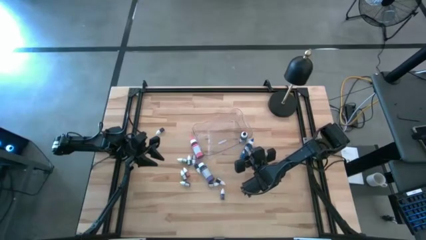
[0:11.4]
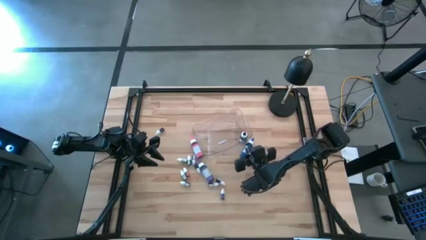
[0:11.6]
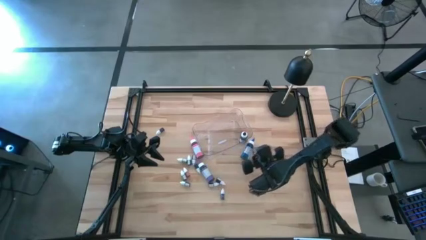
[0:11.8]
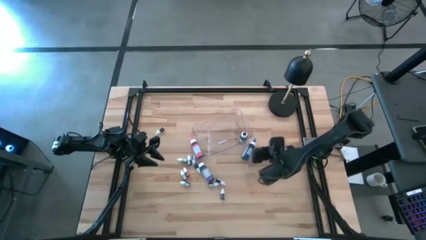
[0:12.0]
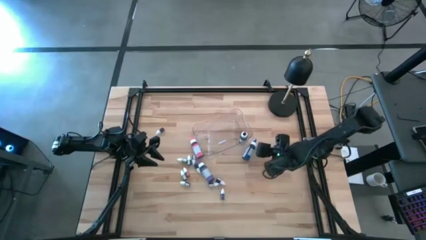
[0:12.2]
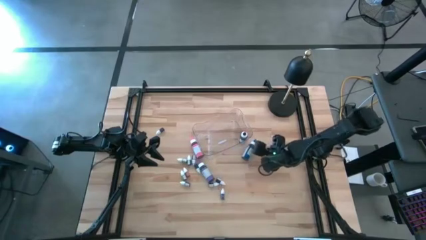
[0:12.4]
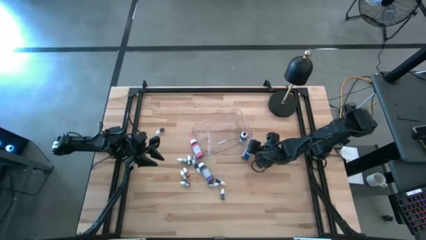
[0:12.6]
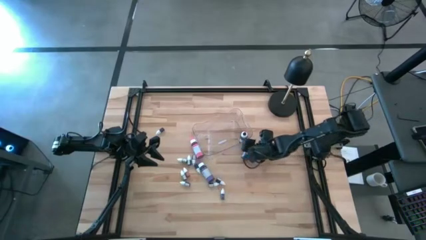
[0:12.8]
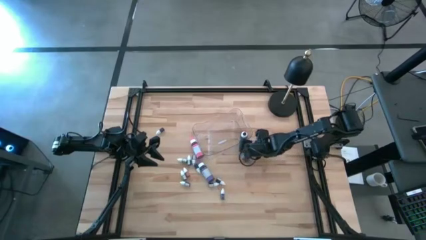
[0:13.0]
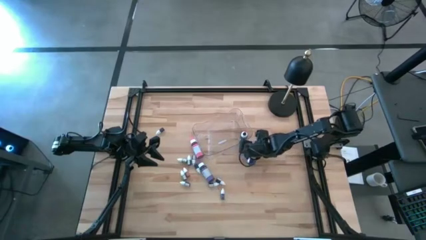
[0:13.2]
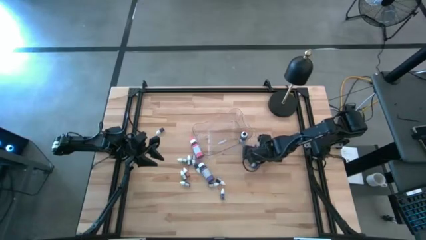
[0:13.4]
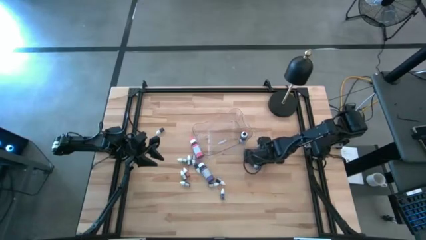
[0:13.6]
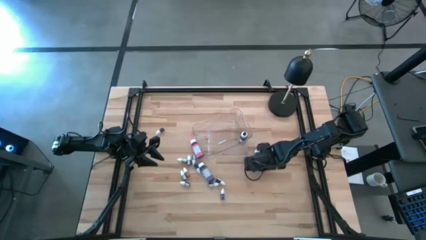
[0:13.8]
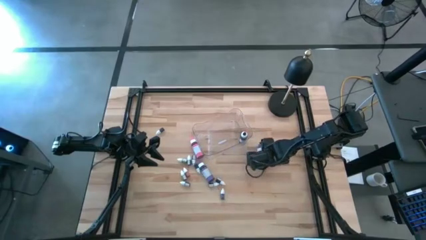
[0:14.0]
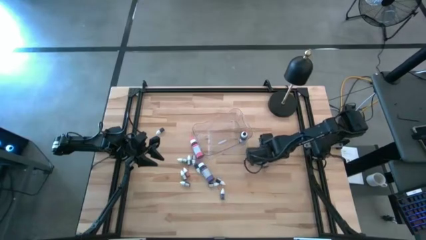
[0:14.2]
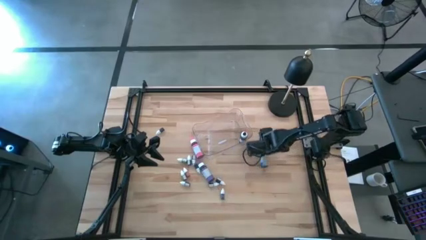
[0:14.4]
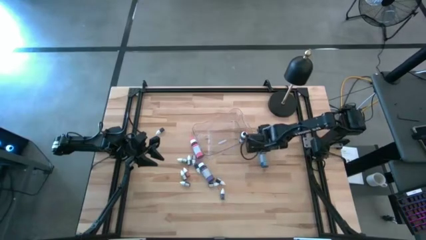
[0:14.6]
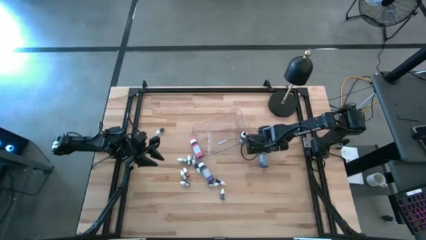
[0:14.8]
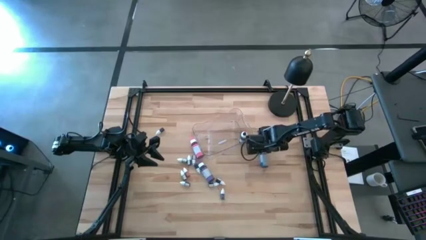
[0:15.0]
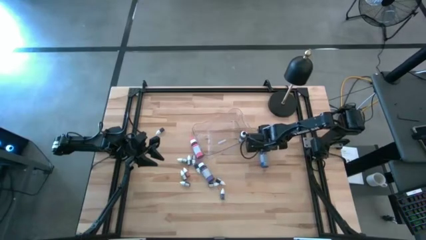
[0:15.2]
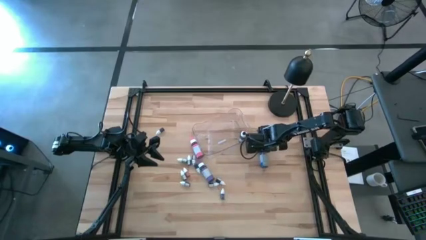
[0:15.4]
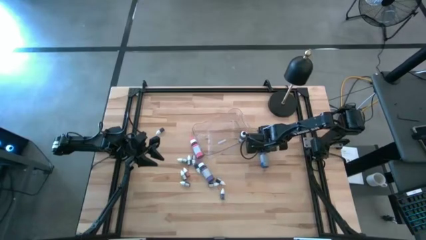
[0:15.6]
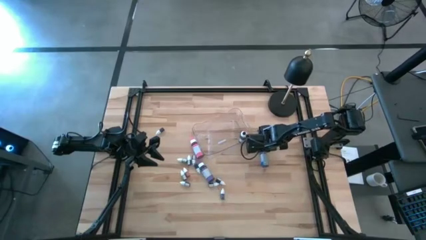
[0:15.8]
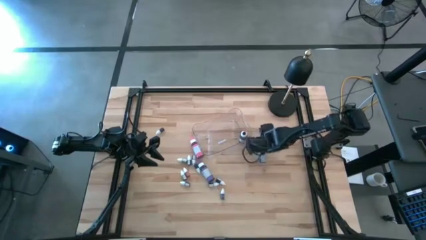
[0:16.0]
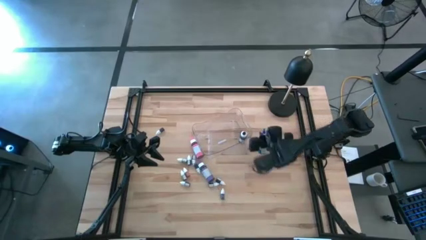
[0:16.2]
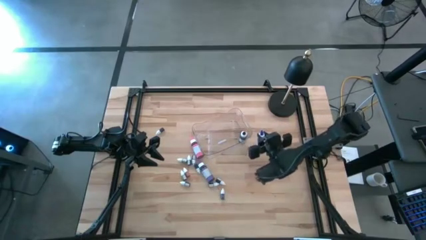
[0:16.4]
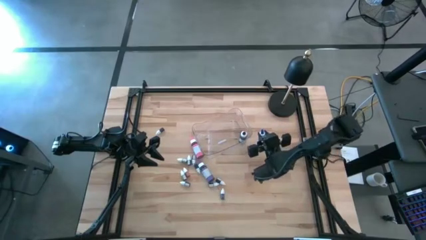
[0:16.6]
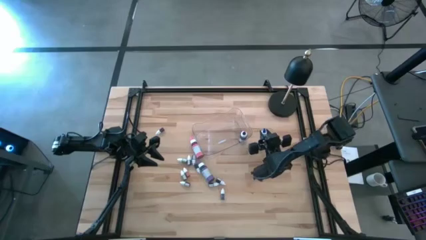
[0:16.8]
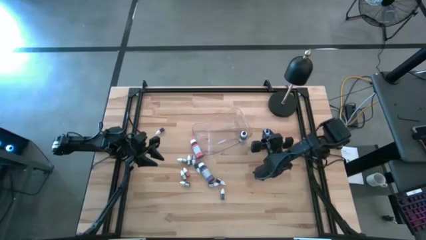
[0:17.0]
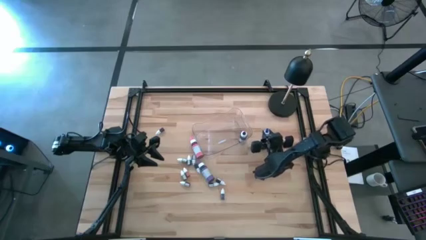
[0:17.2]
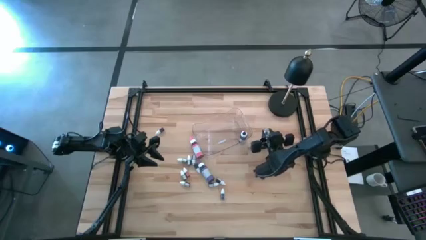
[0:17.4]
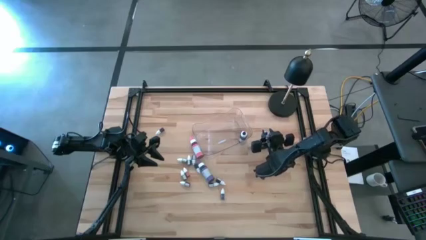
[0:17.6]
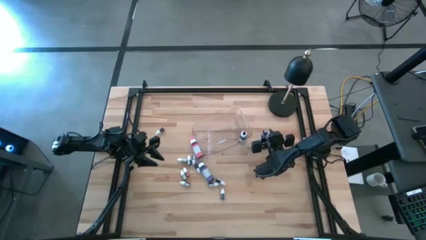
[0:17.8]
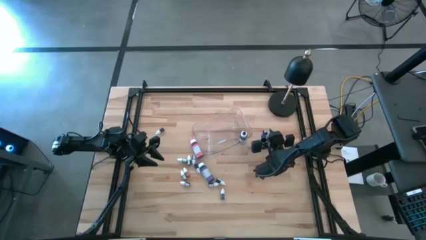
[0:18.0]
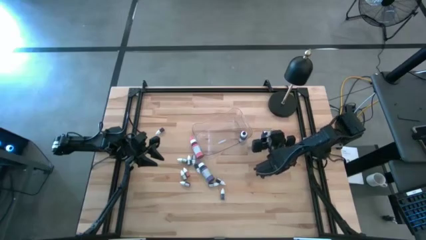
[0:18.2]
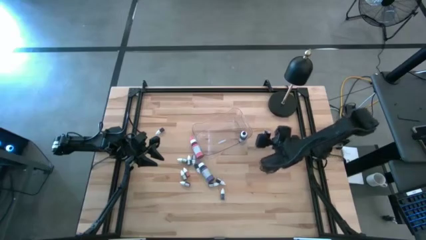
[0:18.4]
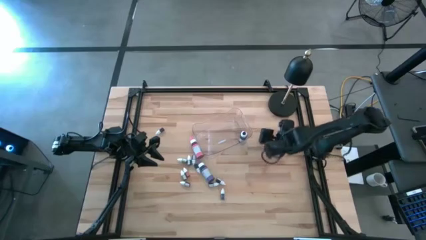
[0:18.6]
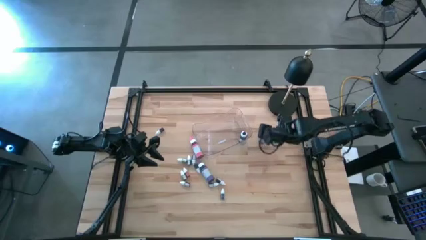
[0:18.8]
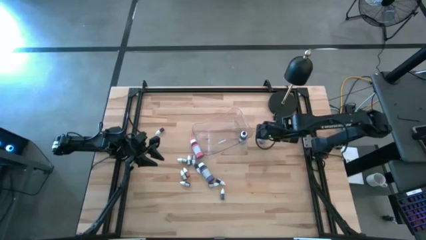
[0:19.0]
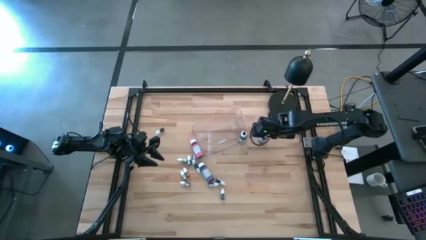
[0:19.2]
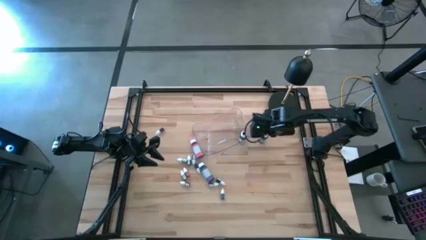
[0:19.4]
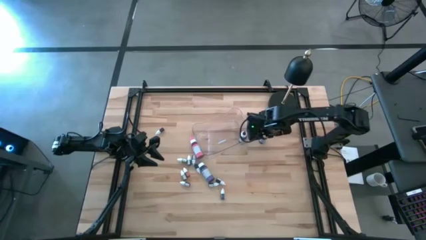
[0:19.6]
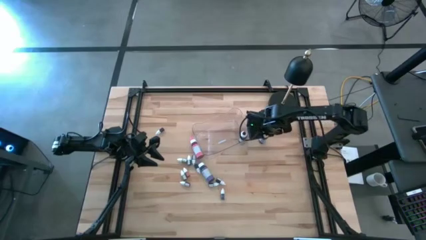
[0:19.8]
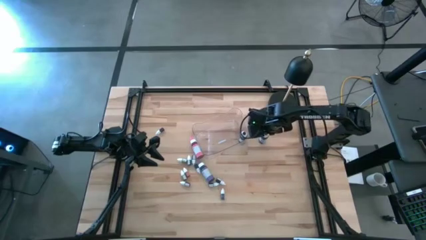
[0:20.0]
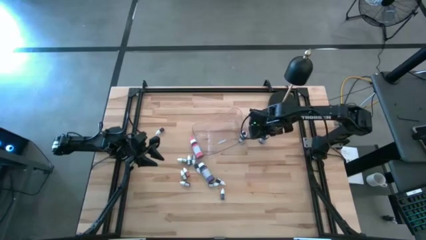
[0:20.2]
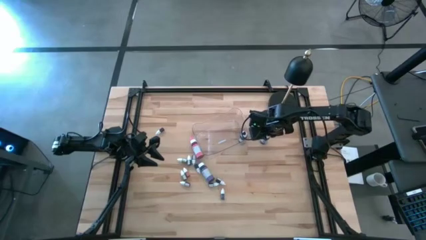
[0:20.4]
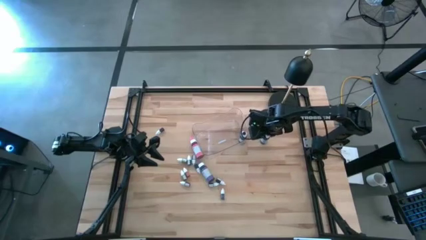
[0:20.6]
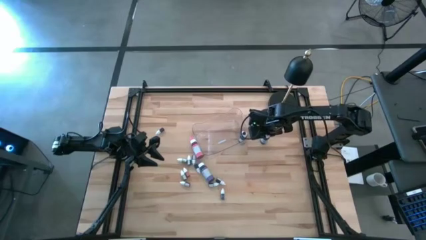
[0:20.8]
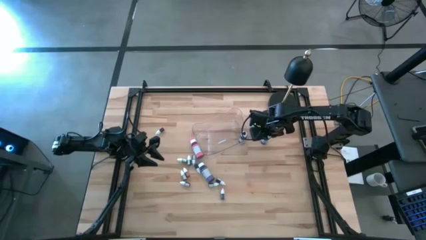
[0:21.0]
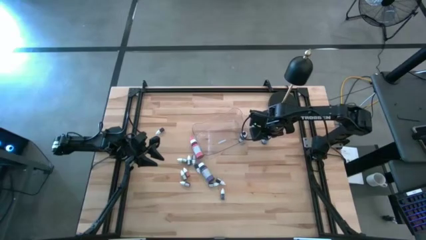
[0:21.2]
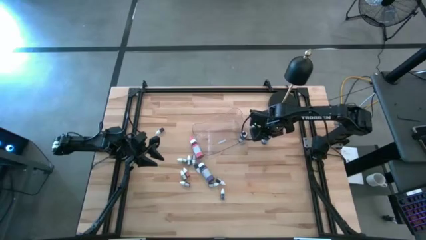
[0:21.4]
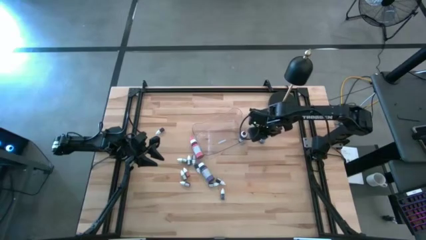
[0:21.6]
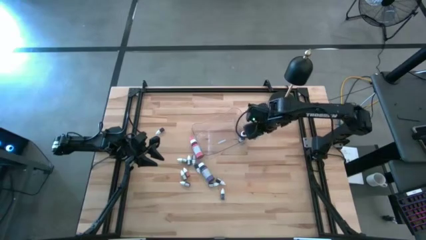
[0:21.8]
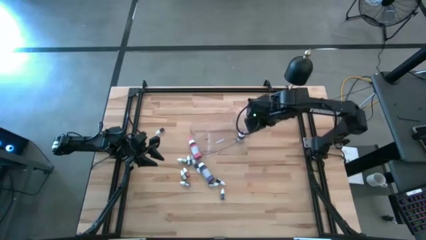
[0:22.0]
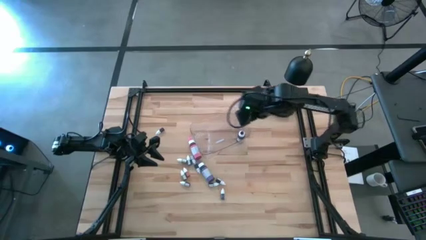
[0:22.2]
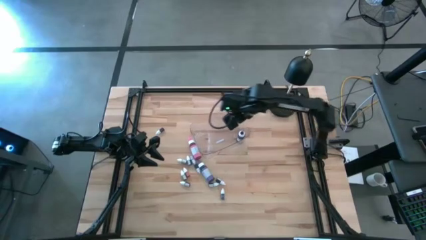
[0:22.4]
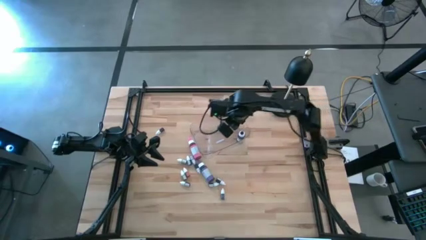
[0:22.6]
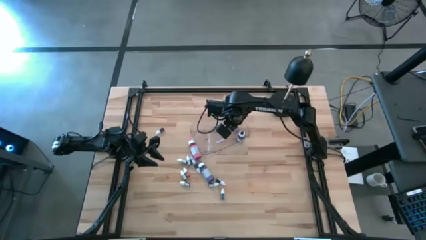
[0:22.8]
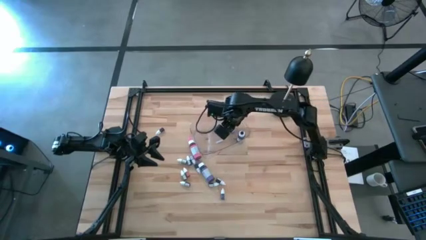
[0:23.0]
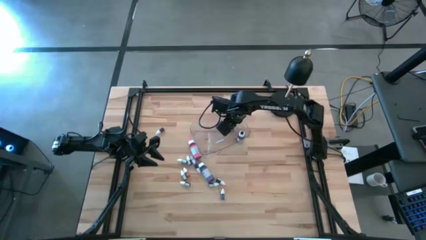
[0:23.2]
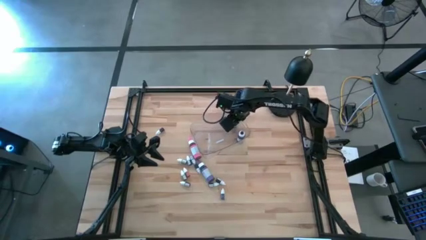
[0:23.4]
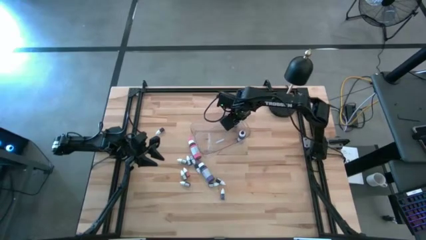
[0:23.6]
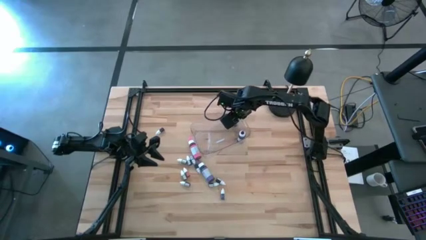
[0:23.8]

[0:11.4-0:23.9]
Task: Pick & Place food coloring
Put the big blue food coloring bottle into the transparent bin
